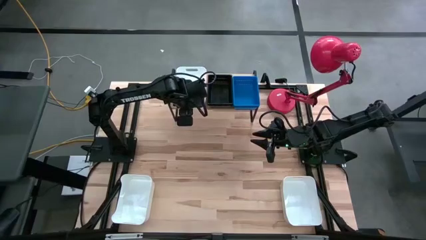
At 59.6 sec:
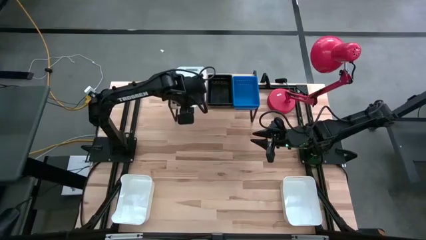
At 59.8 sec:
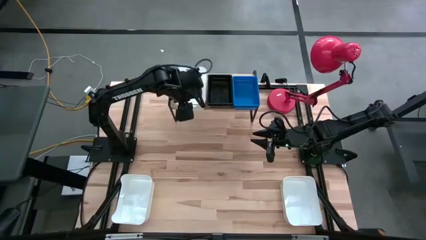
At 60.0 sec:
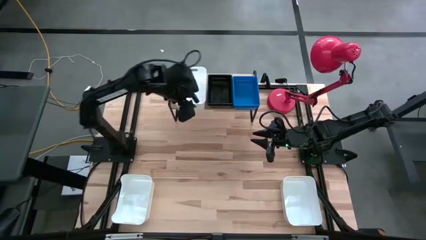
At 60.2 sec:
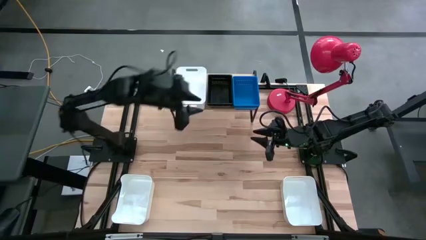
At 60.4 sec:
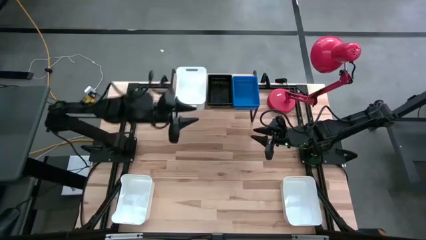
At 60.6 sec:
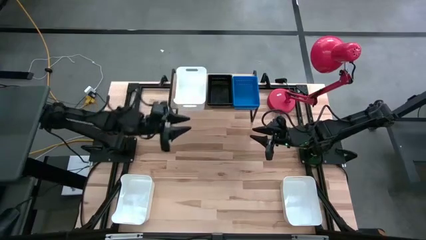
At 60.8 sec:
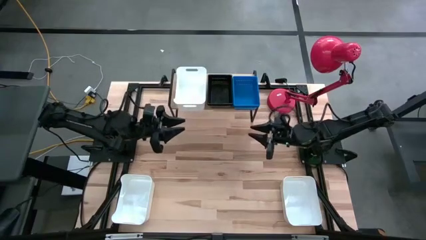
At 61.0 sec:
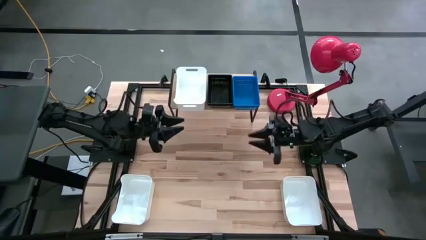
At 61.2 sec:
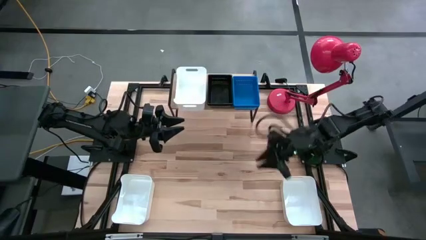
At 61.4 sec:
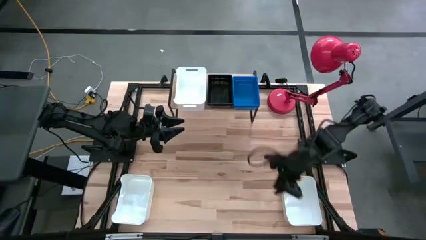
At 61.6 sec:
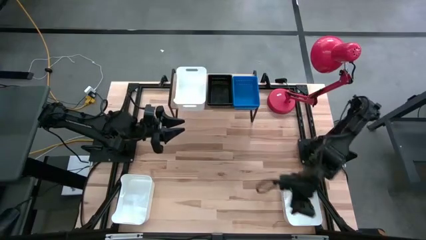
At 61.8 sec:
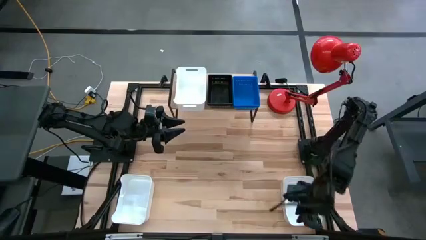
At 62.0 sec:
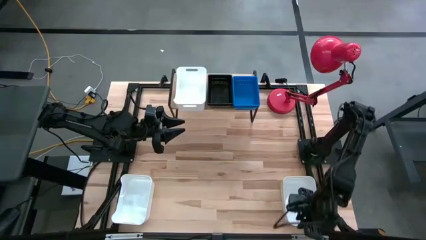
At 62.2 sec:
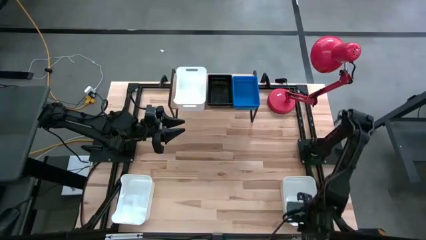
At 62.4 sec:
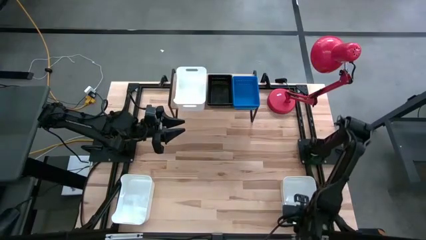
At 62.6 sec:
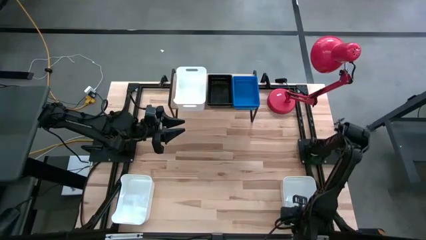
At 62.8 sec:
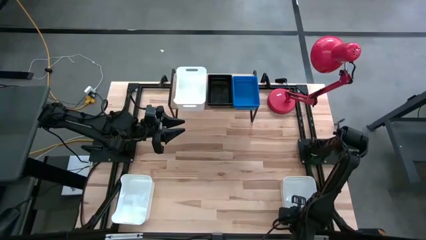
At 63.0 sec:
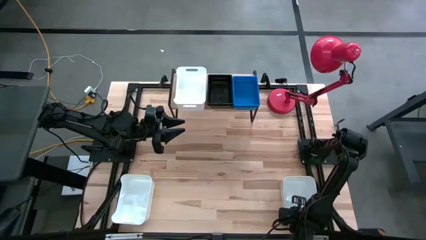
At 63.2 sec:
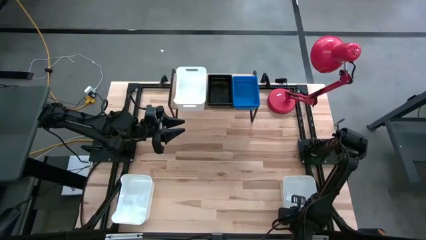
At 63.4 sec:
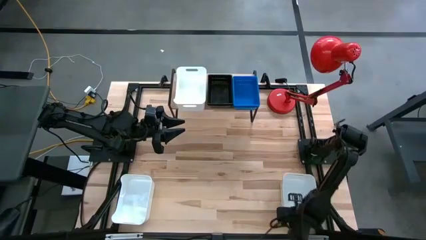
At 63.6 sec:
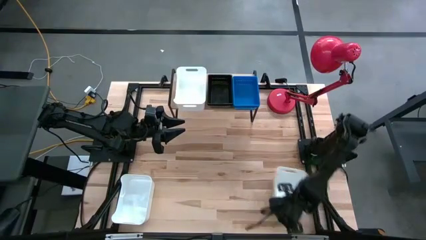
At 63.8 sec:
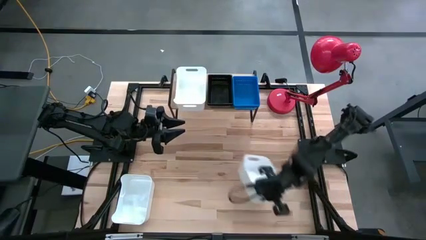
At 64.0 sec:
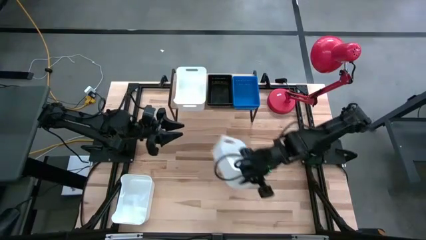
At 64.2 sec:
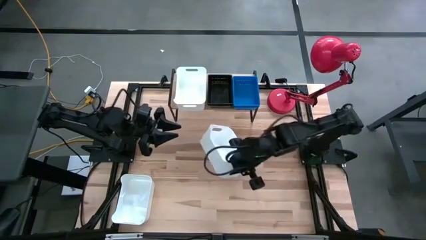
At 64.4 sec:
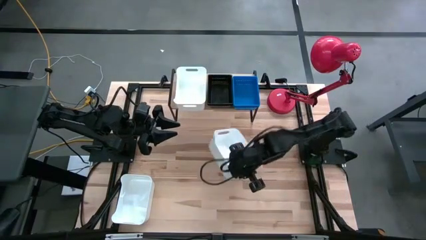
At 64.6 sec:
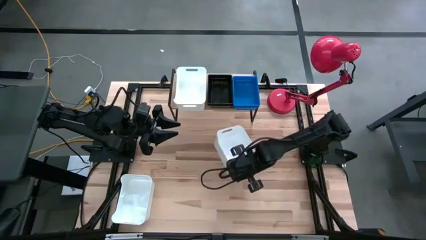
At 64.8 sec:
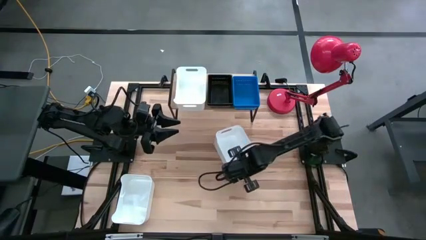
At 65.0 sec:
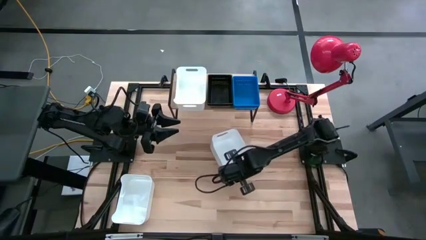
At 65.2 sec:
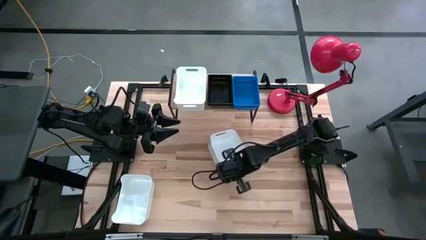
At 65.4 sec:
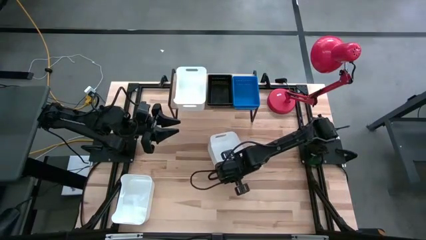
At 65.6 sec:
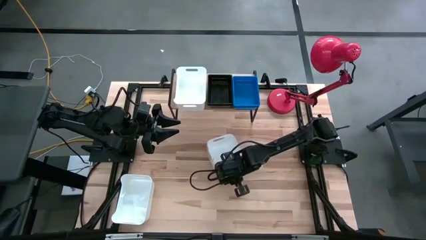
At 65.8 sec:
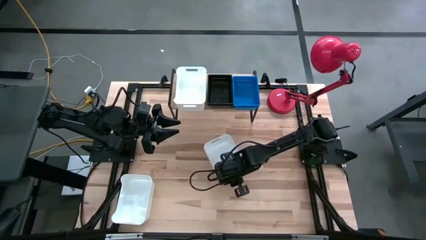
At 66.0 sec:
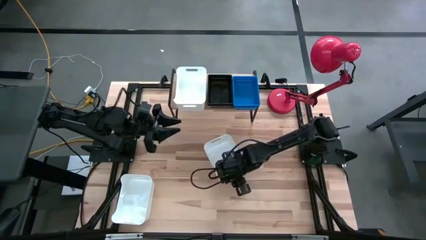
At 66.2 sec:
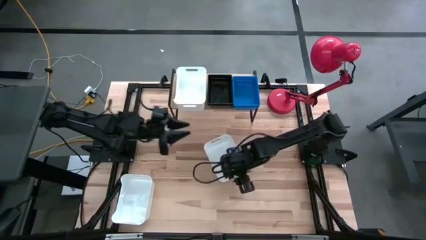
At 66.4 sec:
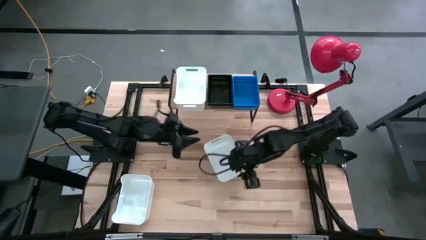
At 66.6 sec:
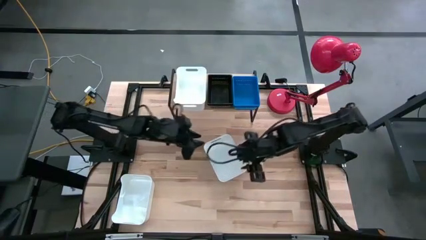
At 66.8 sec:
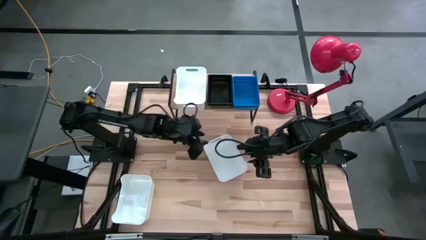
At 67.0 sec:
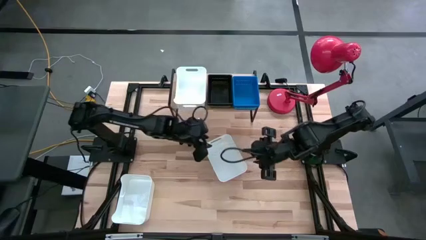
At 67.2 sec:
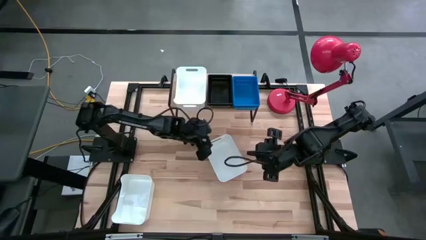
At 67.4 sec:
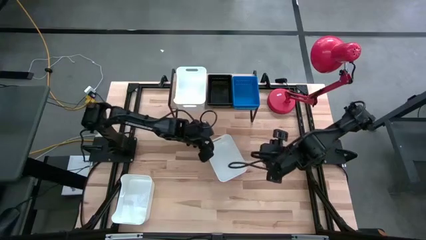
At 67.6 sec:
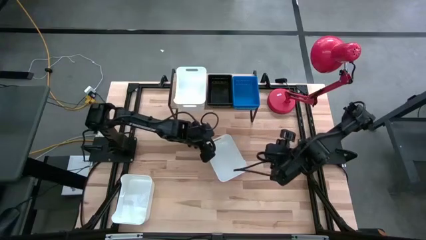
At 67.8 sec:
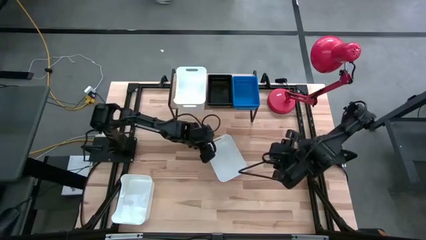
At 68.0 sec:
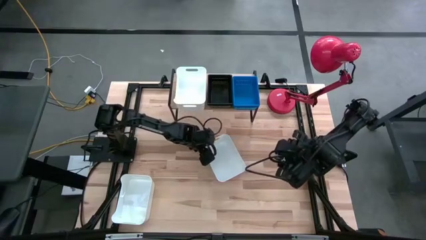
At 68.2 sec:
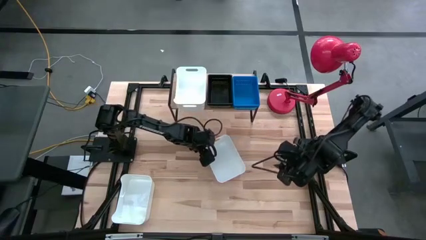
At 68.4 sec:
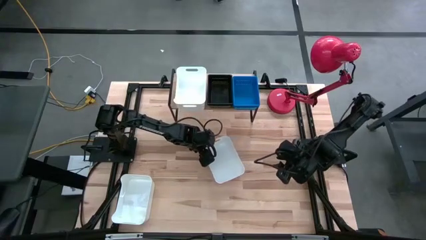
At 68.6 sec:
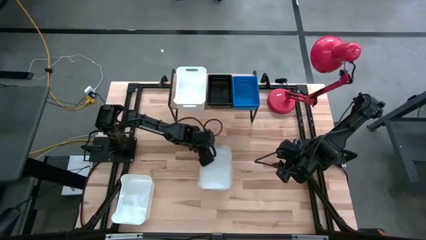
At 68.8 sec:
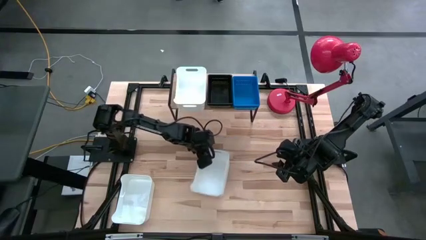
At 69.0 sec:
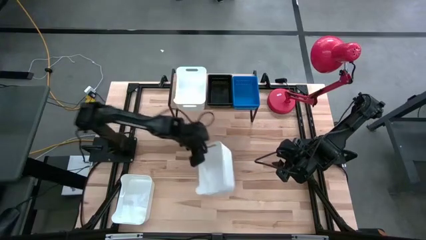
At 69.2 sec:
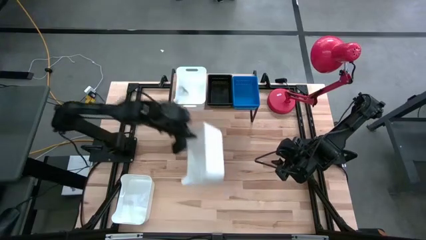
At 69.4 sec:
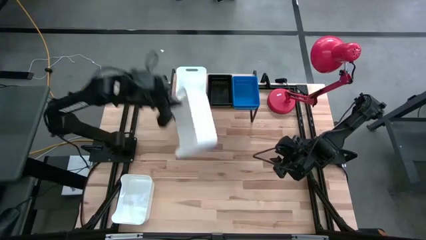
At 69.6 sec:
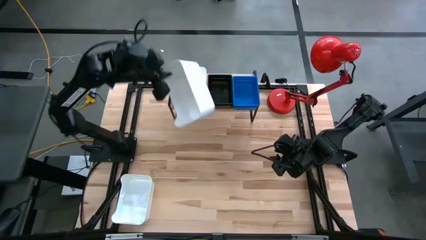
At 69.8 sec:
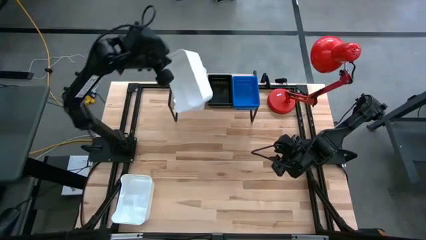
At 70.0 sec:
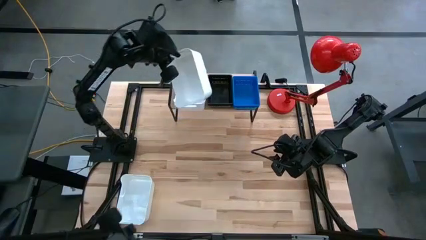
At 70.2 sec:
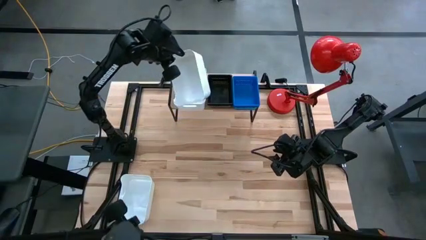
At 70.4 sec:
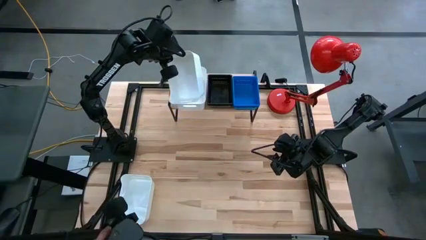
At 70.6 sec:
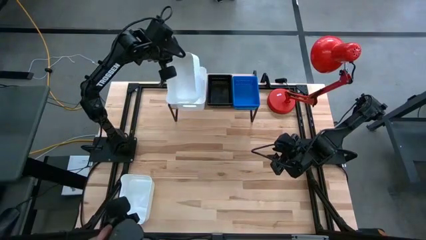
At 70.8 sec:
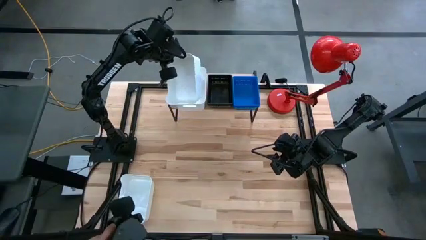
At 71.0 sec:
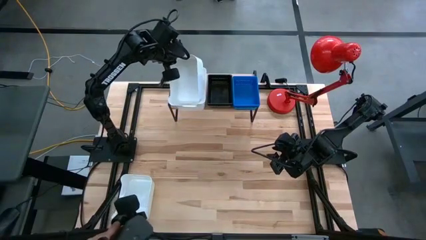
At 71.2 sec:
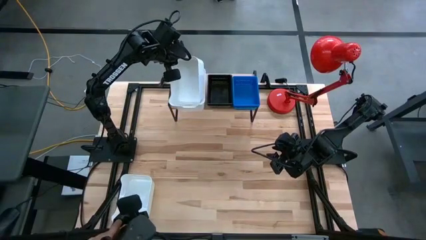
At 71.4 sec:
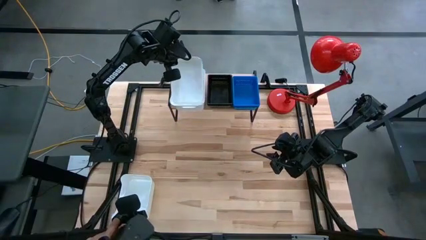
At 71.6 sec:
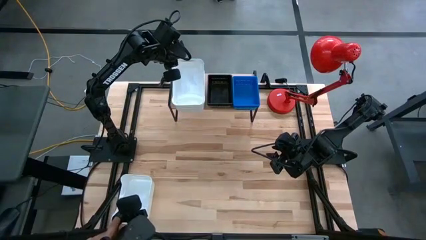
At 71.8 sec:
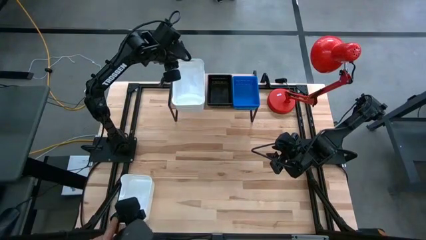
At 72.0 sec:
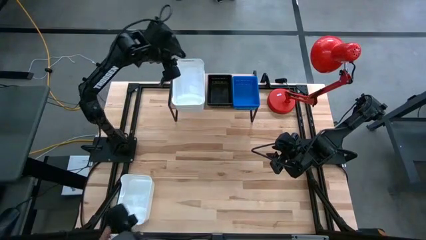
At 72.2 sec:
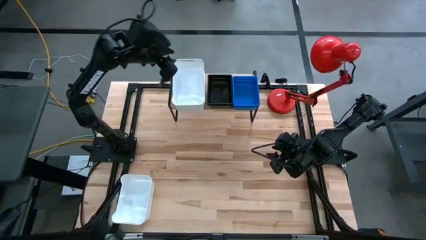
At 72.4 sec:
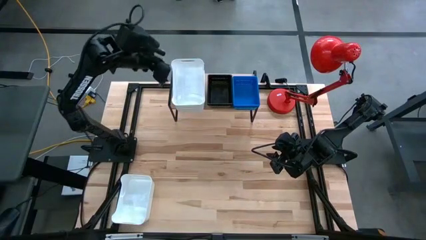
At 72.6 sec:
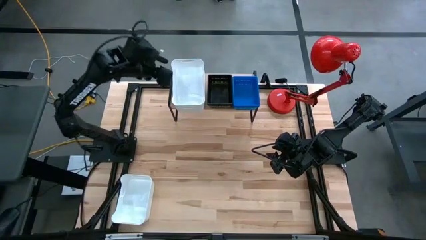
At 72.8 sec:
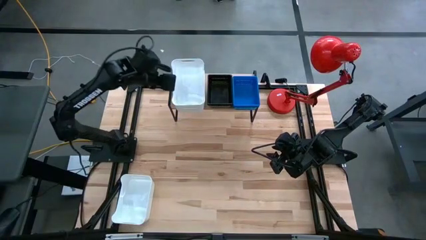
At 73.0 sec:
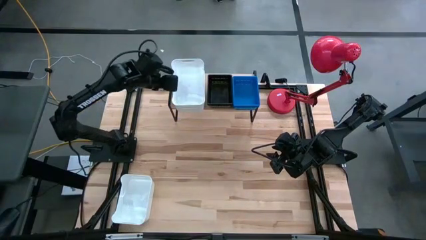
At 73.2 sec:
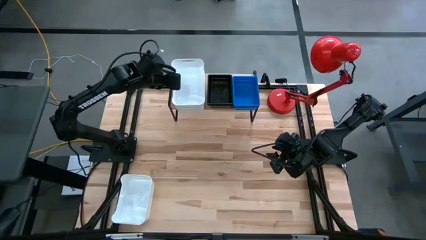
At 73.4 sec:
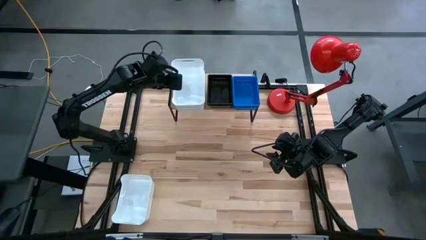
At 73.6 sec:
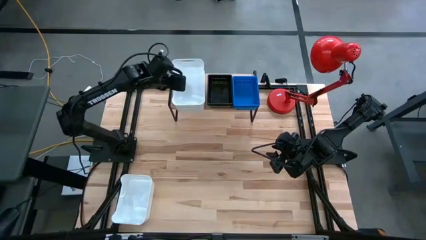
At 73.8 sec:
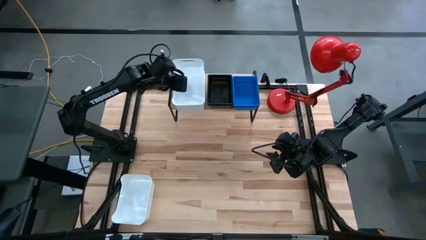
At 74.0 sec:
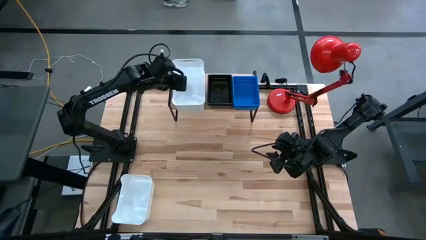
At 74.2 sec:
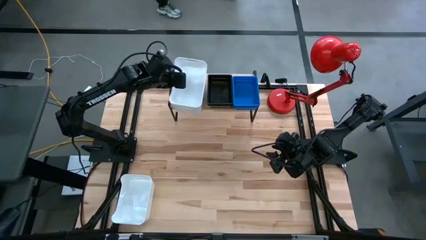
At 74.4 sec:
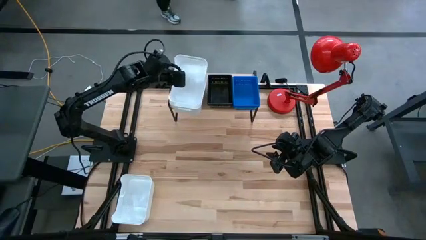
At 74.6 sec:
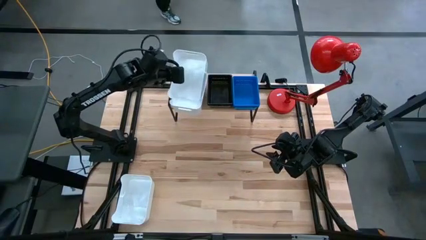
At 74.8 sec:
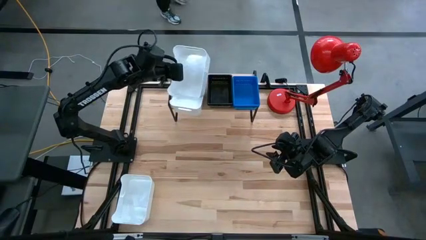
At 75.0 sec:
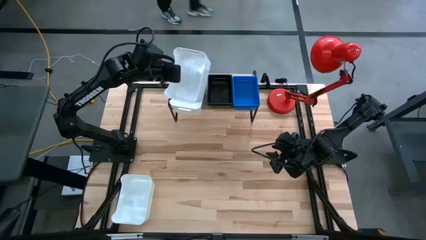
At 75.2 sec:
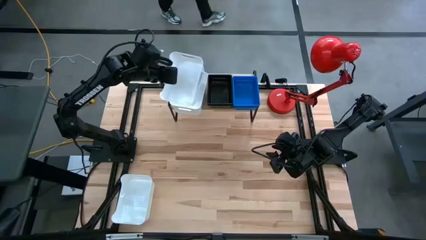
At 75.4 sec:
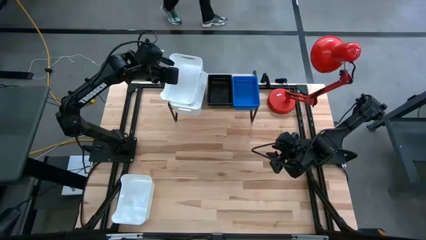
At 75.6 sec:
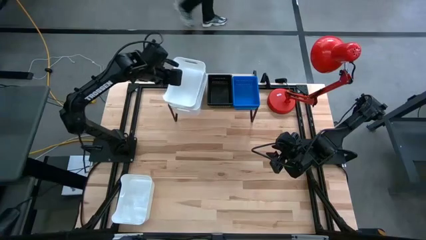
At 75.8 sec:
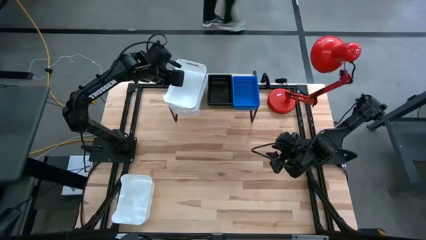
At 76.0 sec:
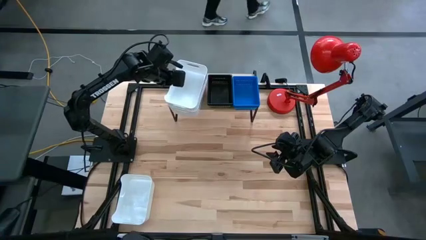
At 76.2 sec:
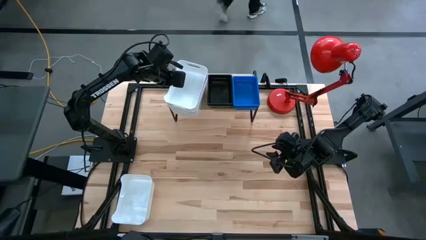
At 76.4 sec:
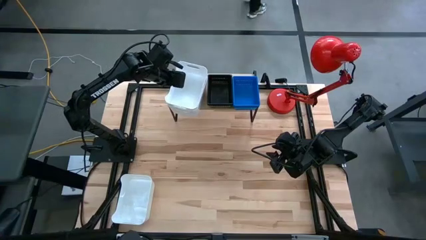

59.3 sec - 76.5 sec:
Task: Stack baskets on shelf by color
Stack the right white bin on top of the other white bin on the shelf
